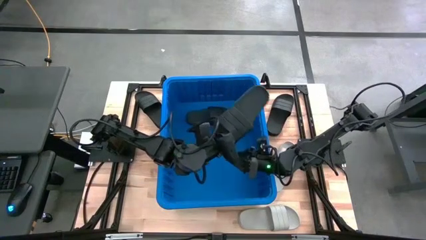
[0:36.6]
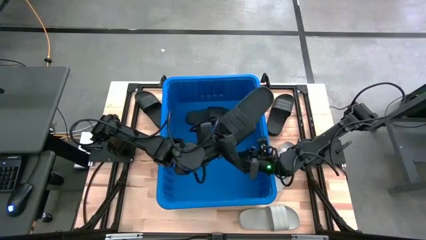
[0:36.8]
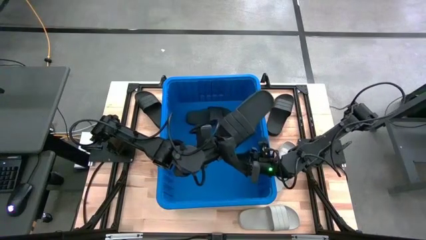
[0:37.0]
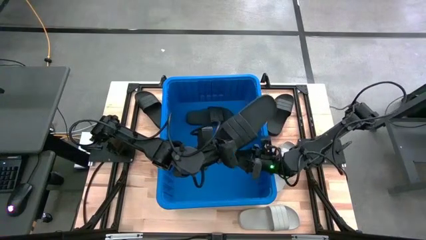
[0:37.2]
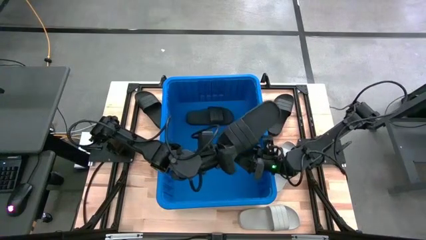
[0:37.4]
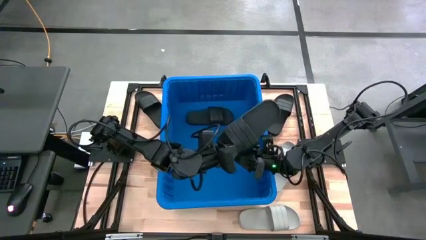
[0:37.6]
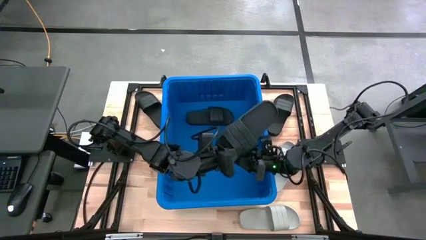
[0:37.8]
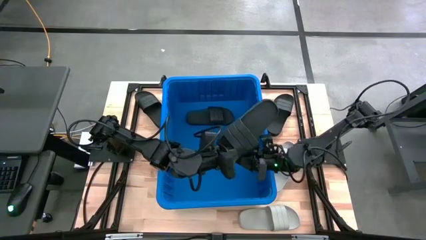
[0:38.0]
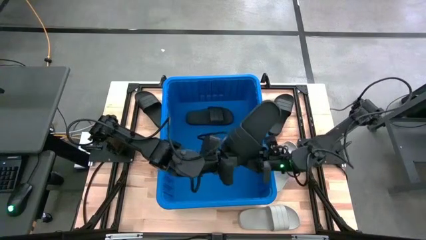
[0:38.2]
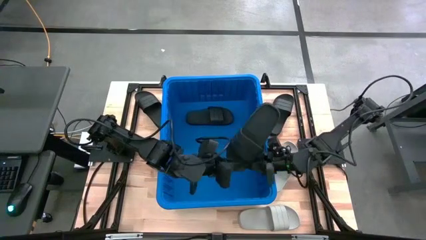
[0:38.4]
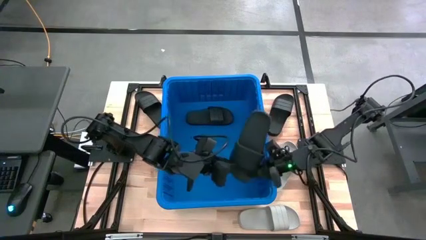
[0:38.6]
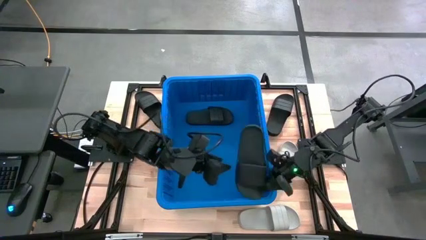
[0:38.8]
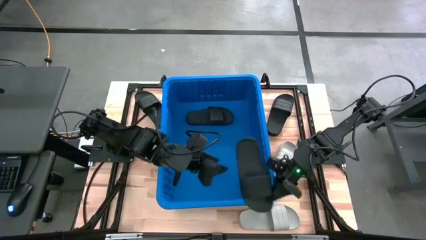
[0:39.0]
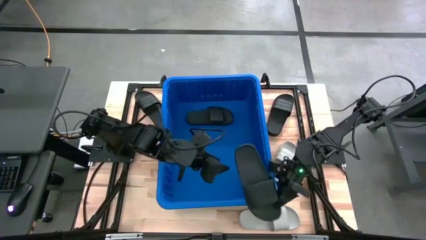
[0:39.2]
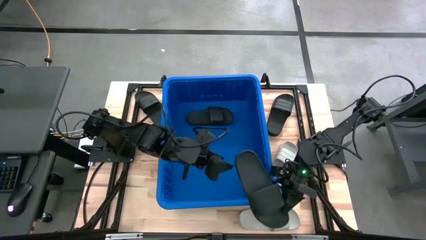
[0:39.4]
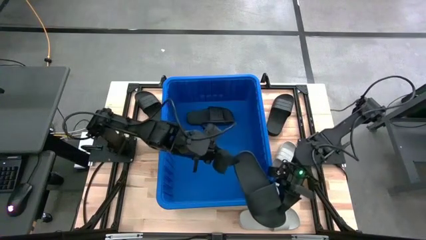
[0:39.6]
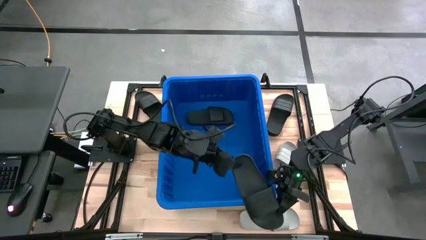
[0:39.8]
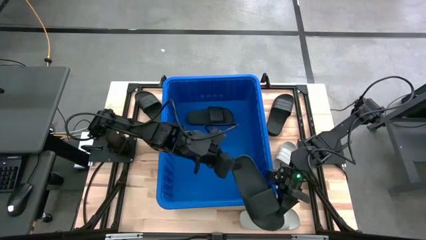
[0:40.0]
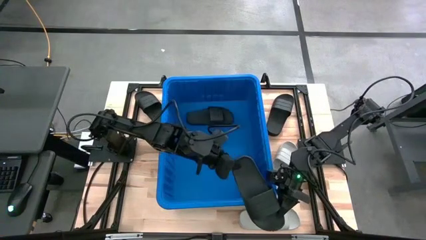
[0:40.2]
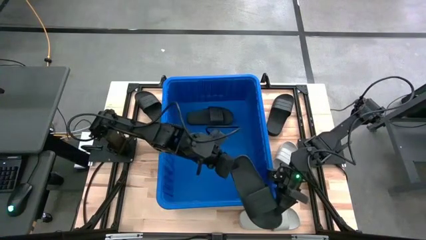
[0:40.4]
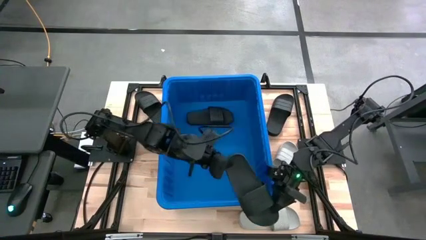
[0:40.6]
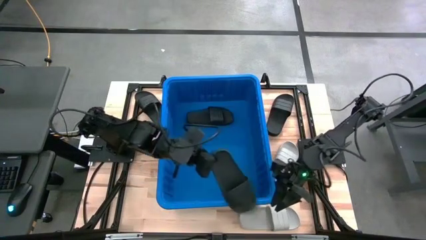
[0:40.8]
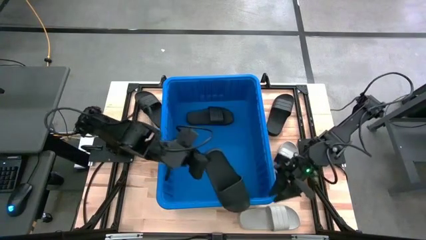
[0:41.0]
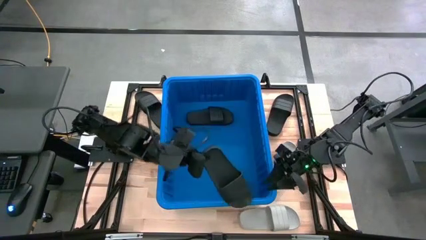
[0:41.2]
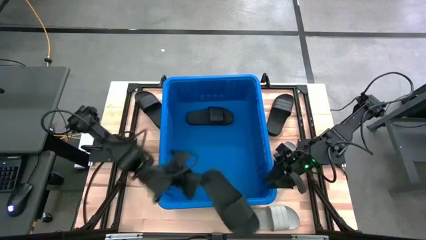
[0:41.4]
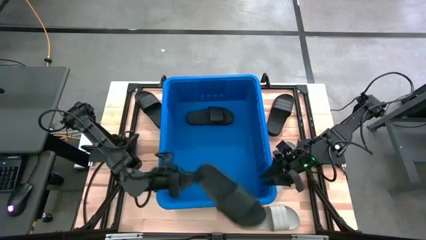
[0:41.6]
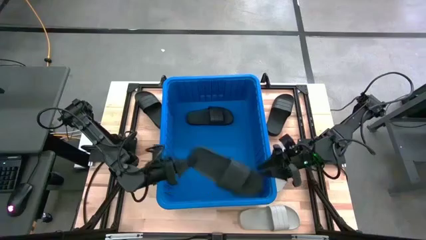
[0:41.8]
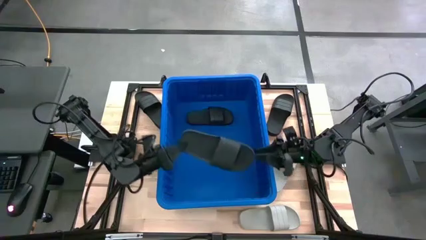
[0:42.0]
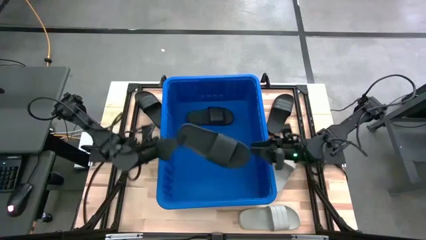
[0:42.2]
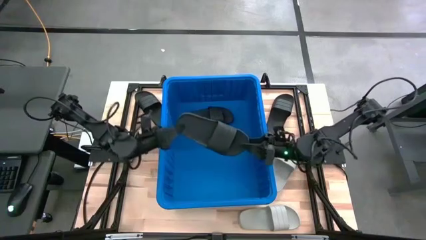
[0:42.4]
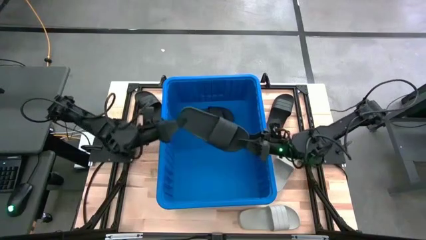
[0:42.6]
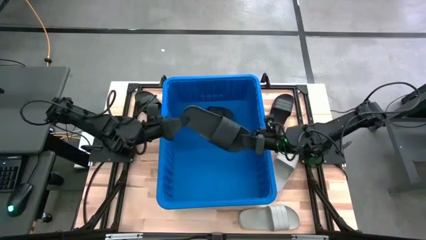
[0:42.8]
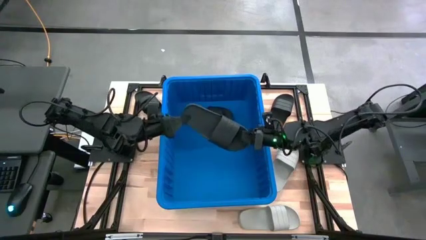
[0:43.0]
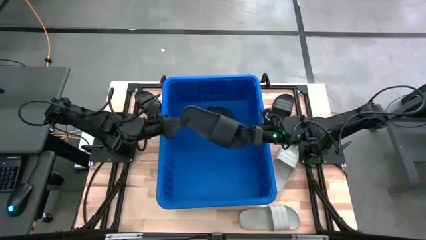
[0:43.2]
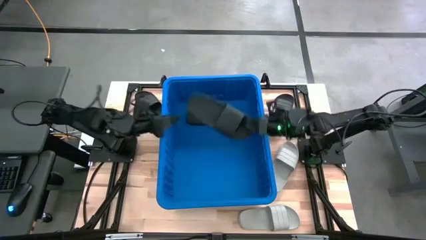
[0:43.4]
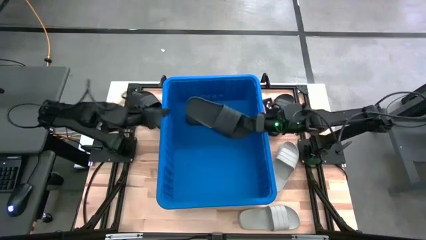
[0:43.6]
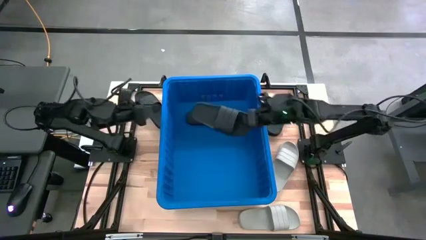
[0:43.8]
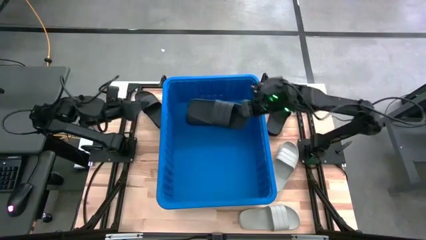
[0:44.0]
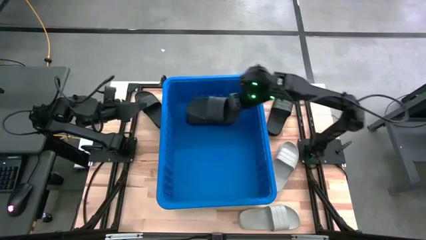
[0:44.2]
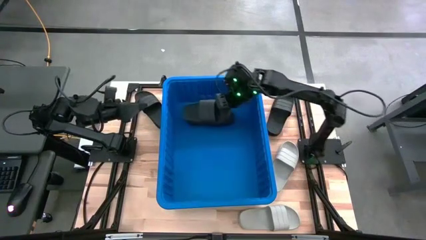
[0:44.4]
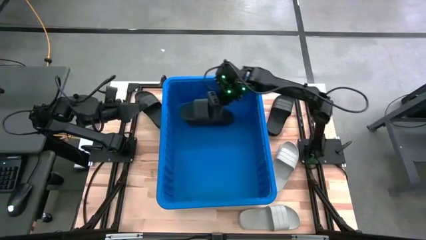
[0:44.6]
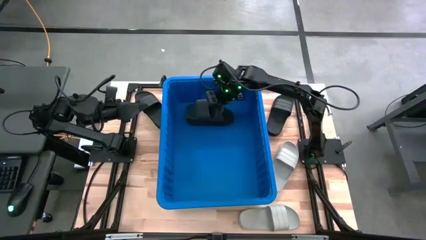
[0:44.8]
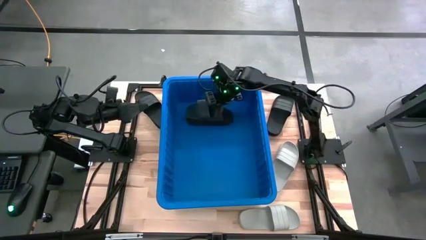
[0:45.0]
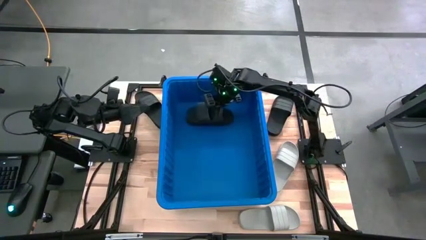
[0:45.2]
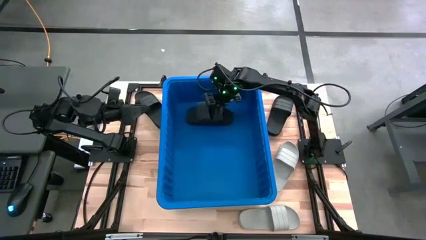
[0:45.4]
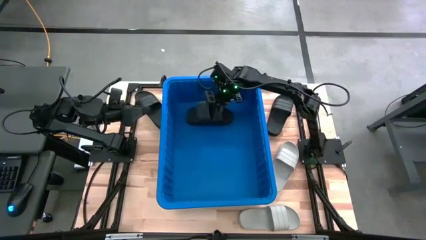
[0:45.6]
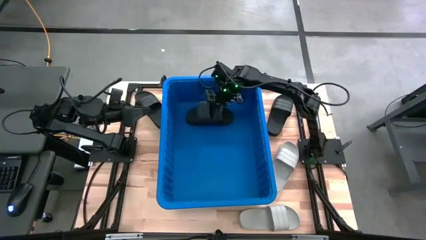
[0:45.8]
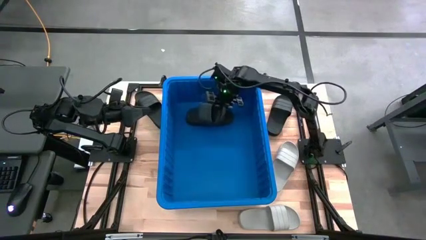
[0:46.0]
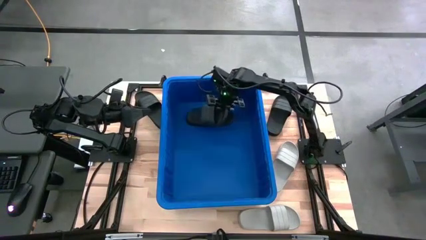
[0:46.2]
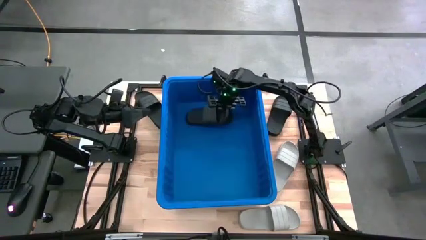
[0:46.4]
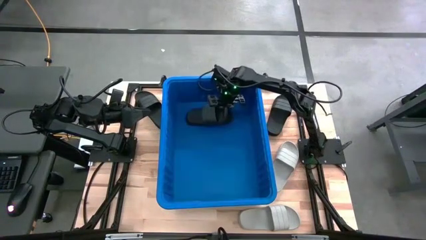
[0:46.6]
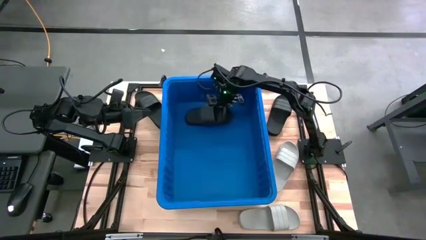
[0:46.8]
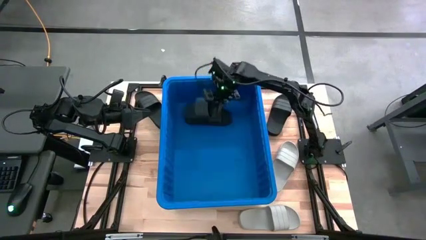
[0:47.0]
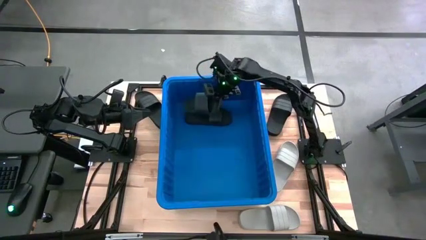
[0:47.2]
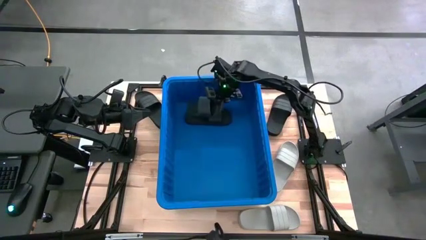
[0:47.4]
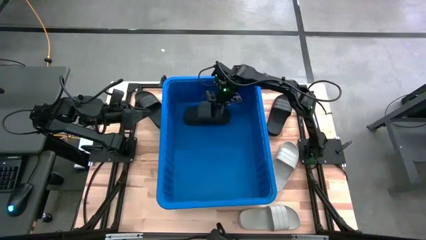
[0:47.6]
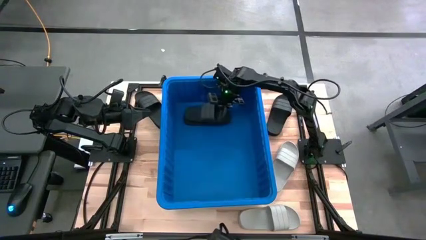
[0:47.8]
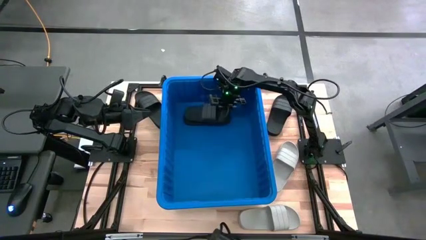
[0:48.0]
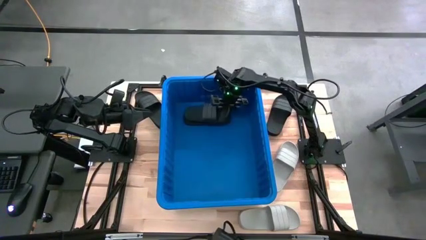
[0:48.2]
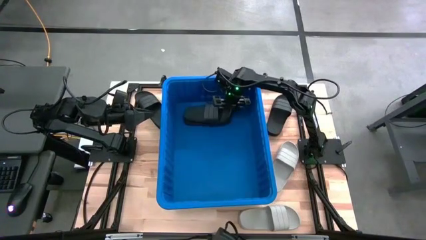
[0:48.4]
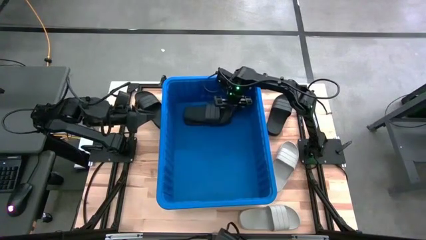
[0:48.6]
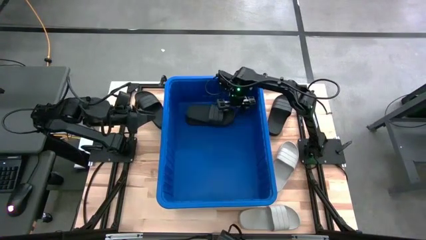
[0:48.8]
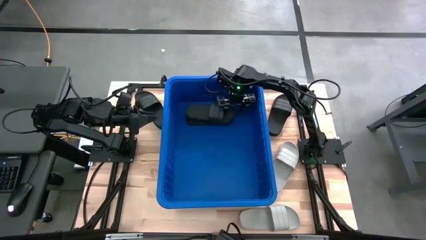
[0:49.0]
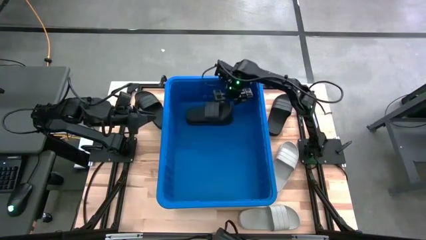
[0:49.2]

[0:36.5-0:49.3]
Task: Pick and place slides into bin
Put the black slide into the blue bin

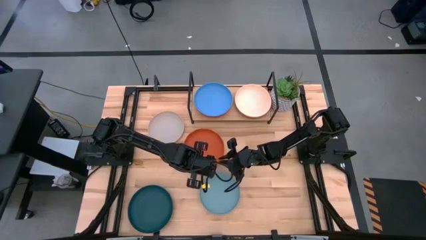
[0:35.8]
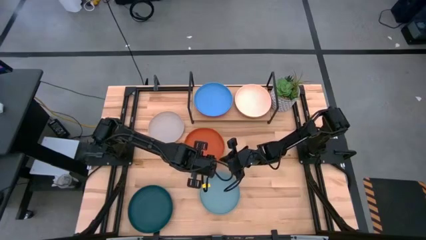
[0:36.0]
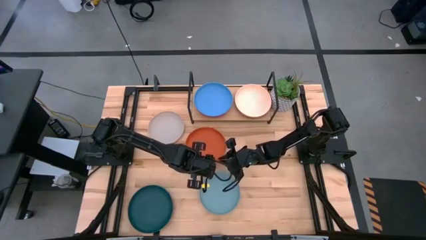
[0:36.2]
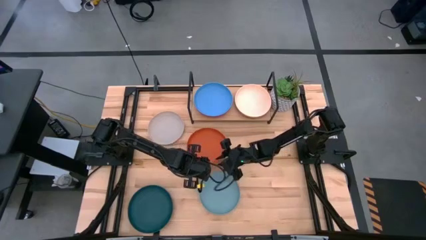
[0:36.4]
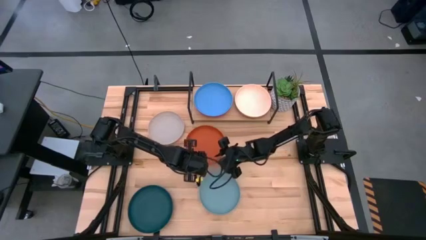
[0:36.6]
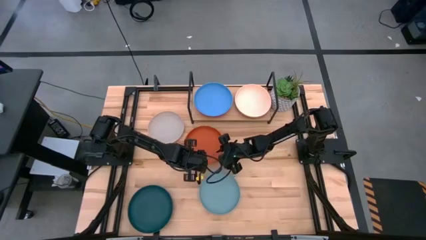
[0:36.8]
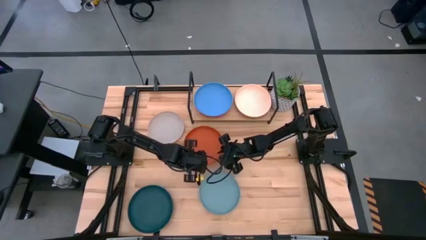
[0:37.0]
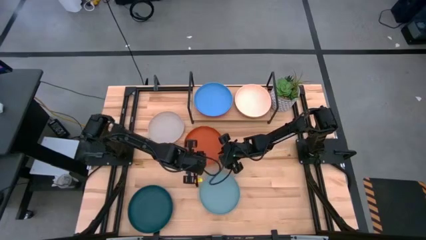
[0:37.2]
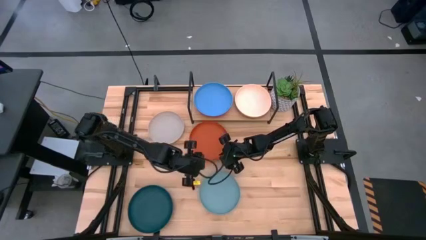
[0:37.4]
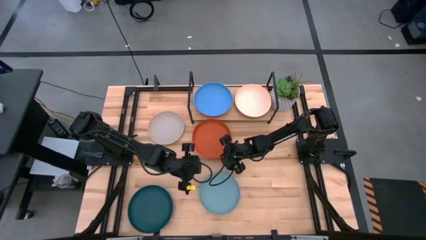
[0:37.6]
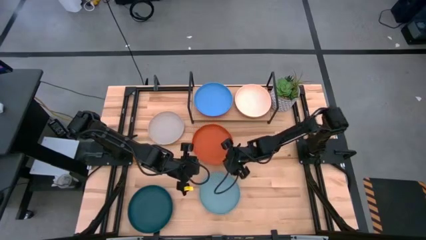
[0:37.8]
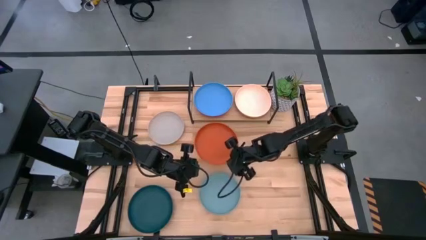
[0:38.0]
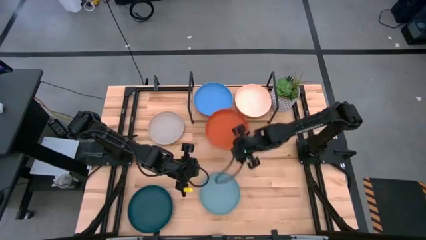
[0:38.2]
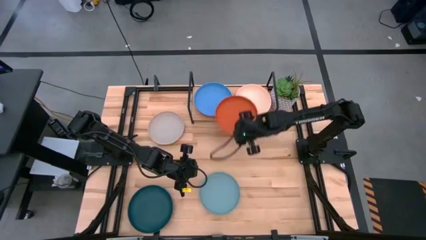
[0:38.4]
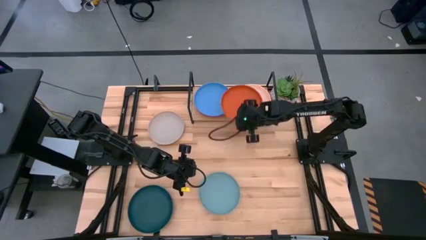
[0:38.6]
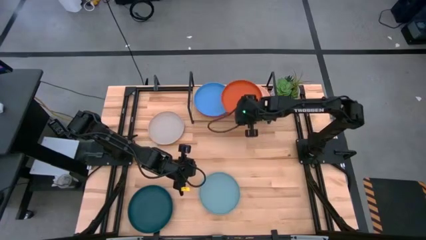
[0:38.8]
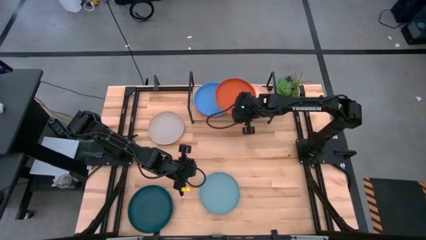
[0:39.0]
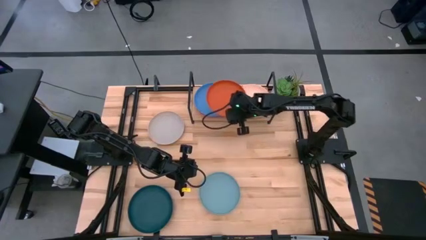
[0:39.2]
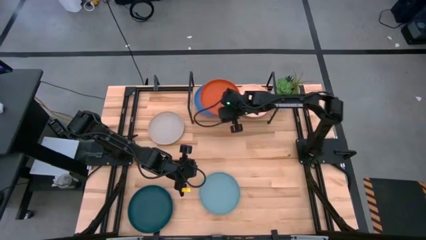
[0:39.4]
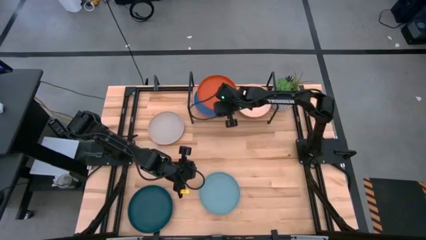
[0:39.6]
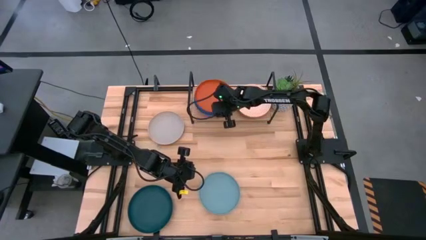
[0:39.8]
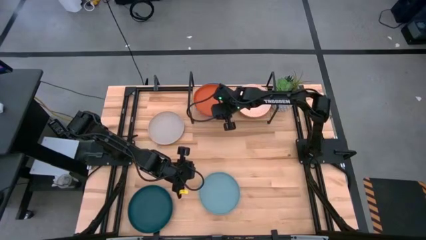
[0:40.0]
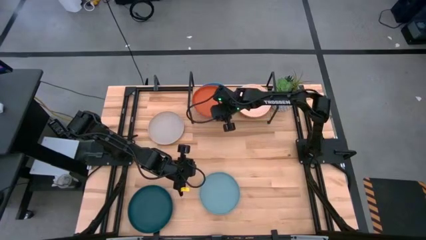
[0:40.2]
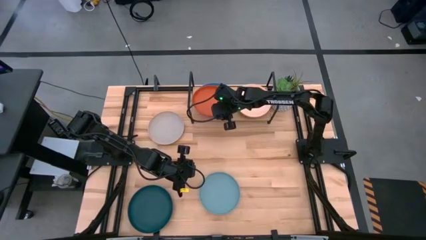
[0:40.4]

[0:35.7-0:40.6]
Task: Place and stack plates onto a shelf
Stack the orange plate on top of the blue plate on the shelf
